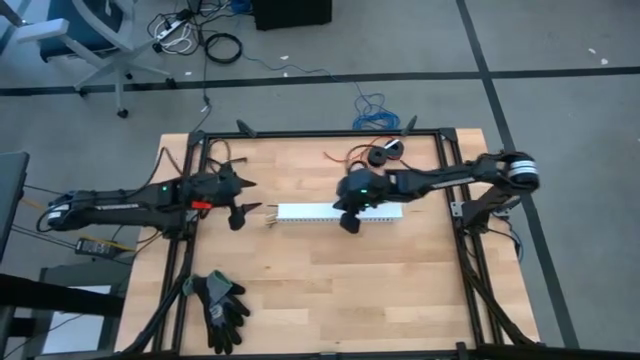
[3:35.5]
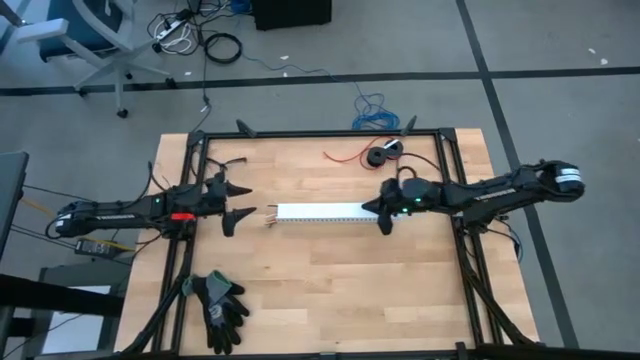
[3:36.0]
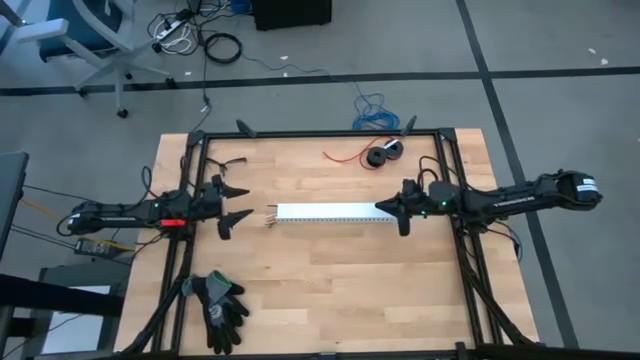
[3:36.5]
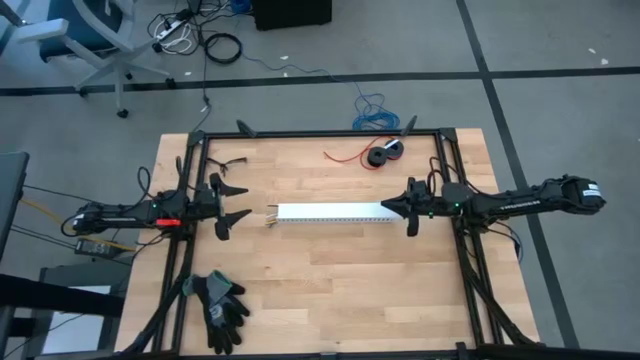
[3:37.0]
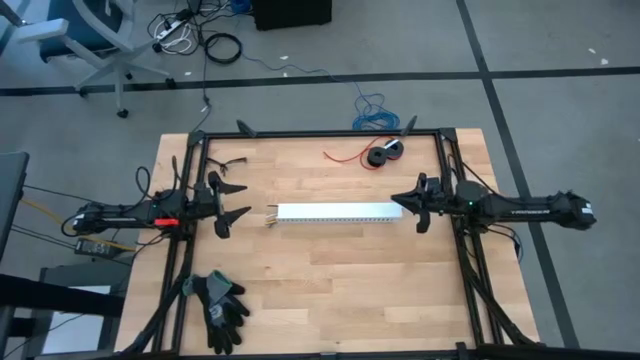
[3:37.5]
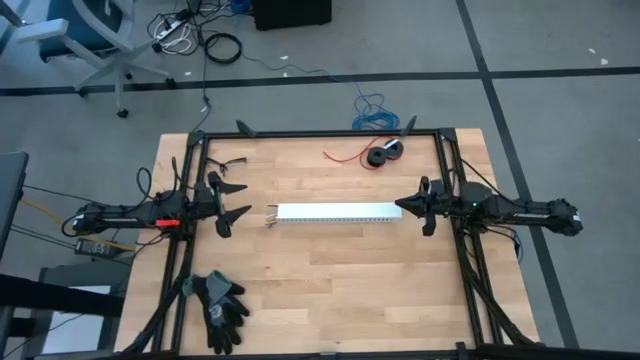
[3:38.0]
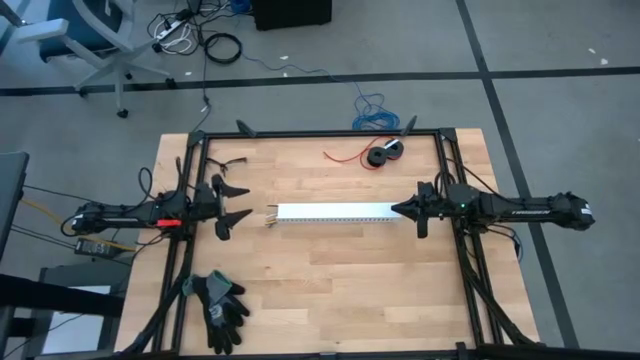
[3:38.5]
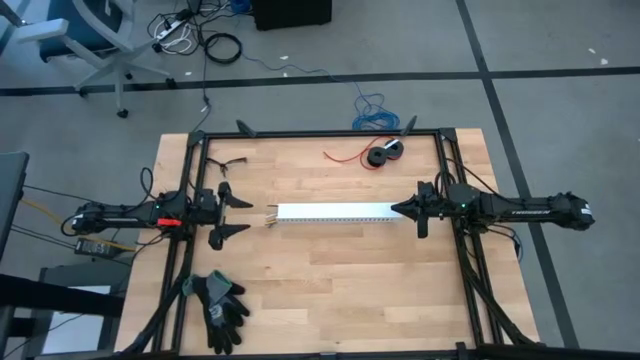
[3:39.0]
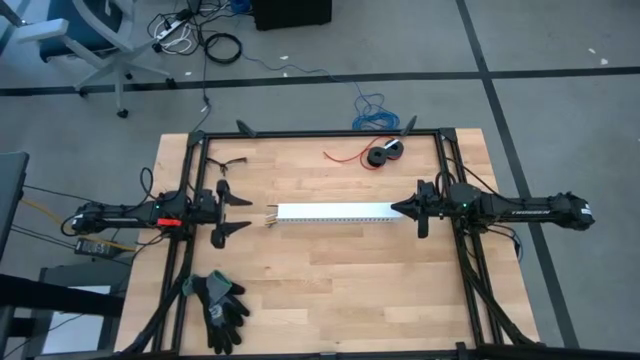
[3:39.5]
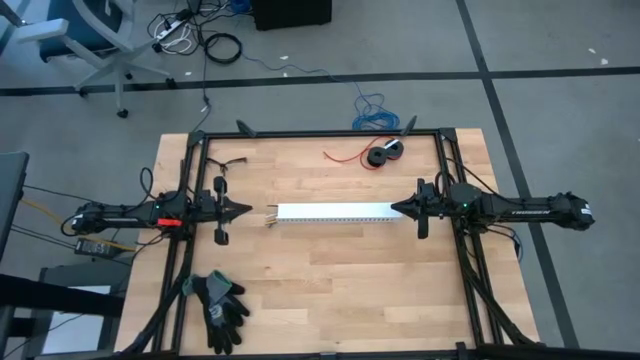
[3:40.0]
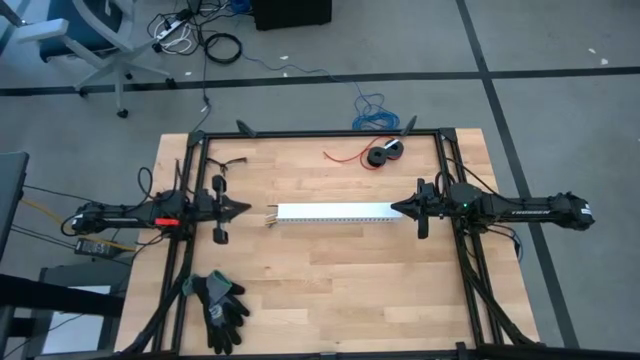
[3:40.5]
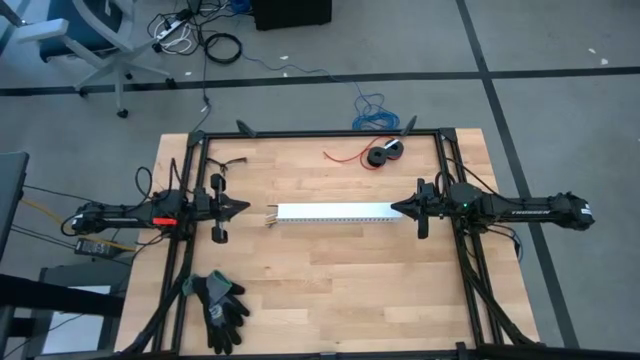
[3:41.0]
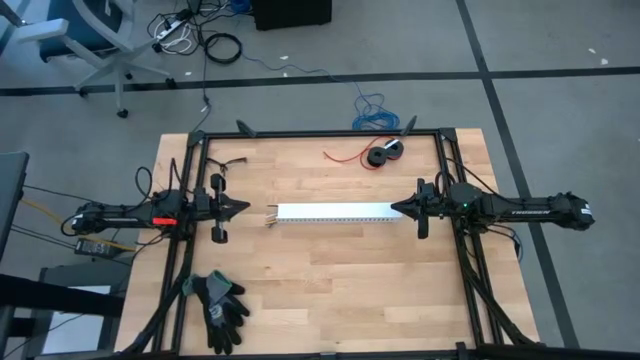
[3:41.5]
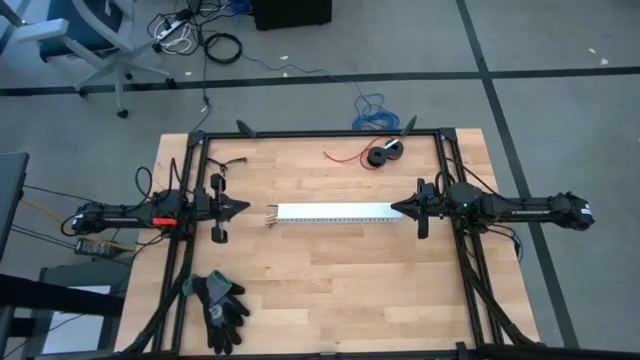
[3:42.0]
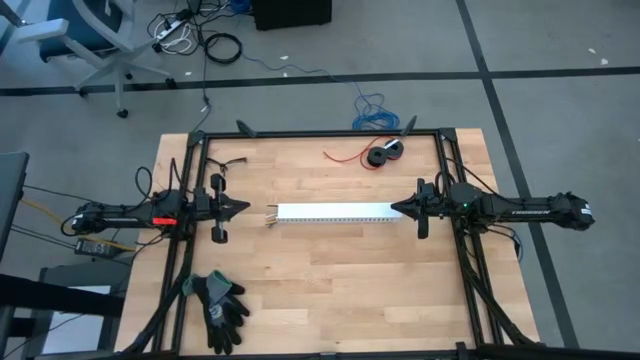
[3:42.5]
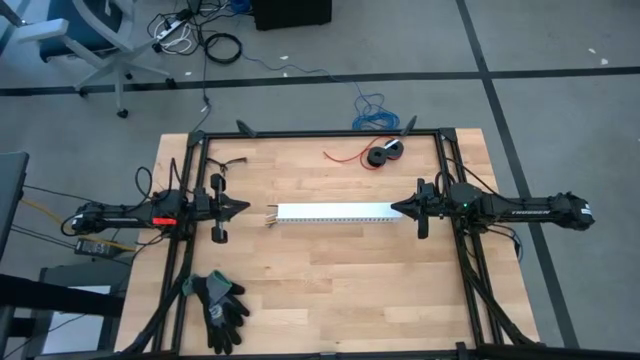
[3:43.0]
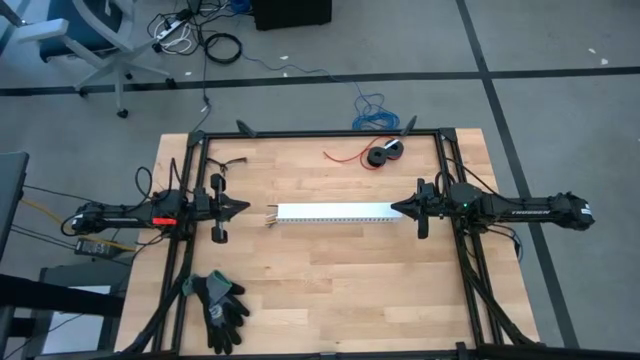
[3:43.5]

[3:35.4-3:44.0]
Task: Ziptie cables
Return to Home Position

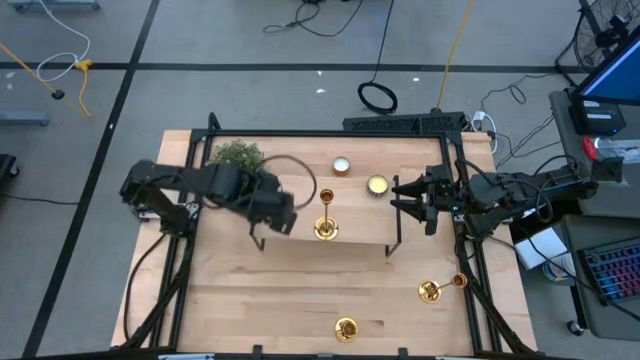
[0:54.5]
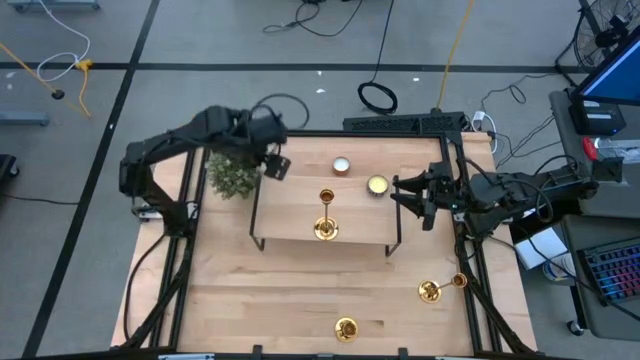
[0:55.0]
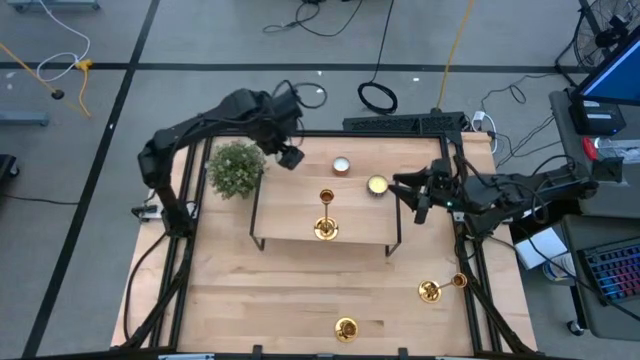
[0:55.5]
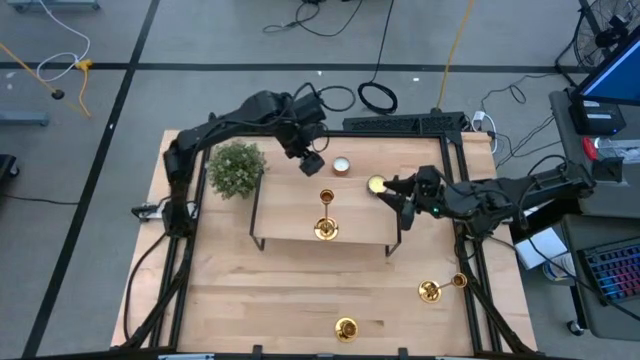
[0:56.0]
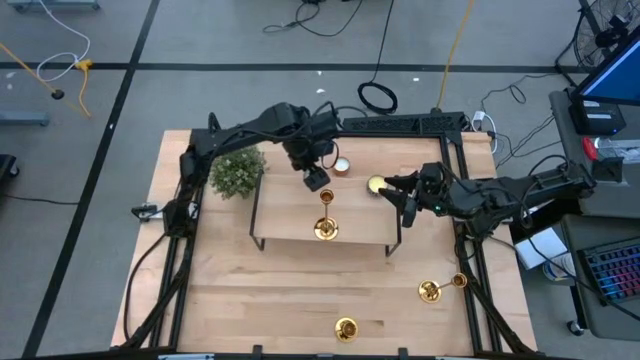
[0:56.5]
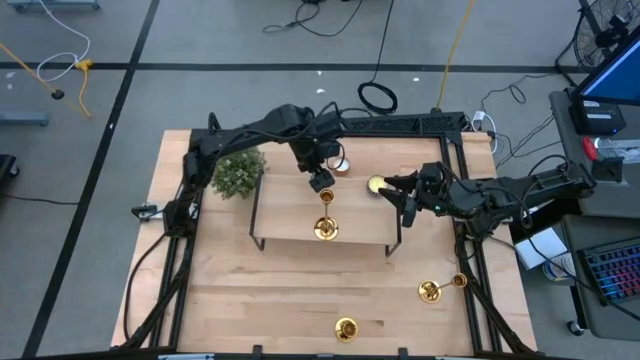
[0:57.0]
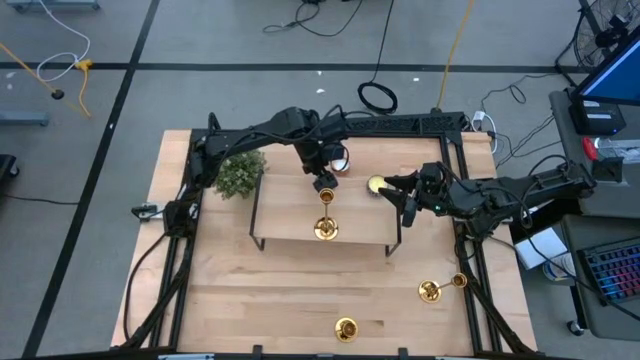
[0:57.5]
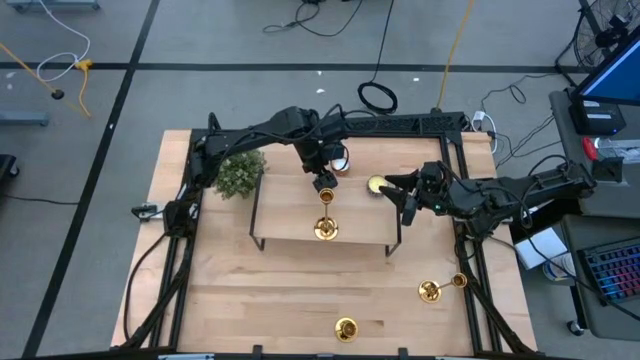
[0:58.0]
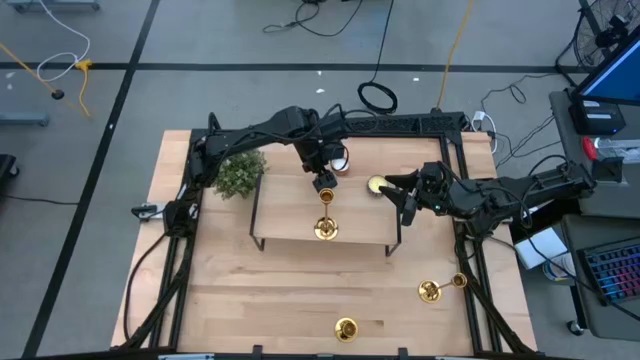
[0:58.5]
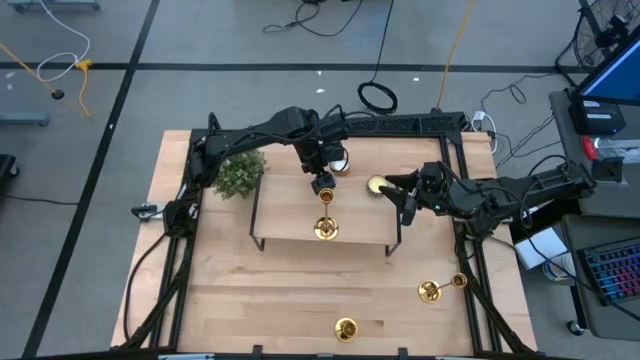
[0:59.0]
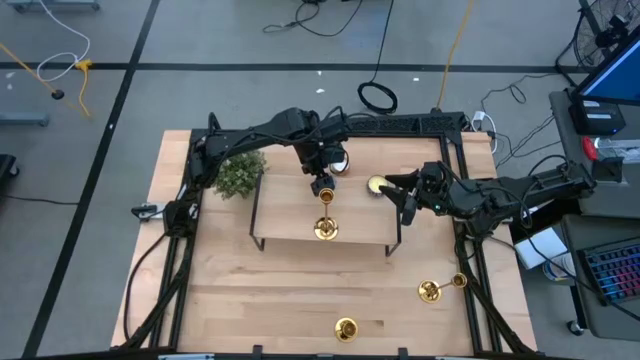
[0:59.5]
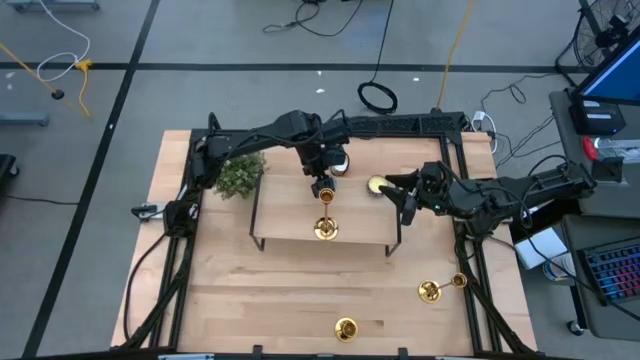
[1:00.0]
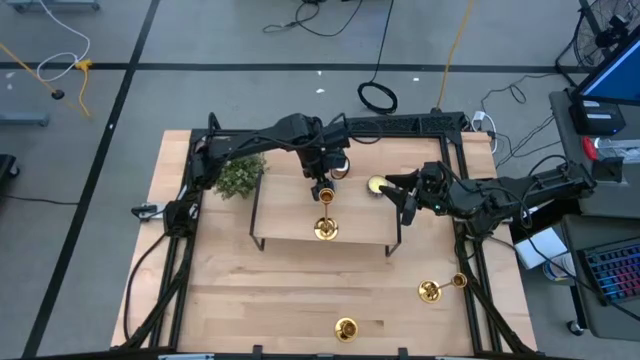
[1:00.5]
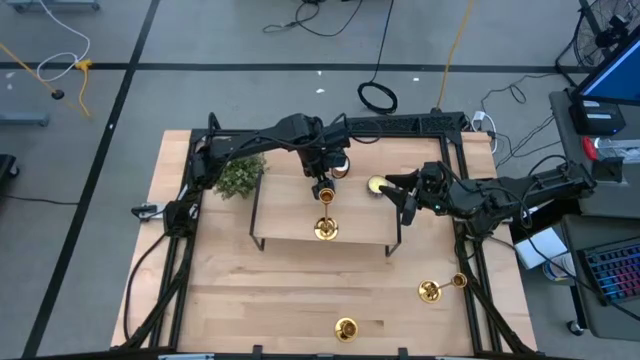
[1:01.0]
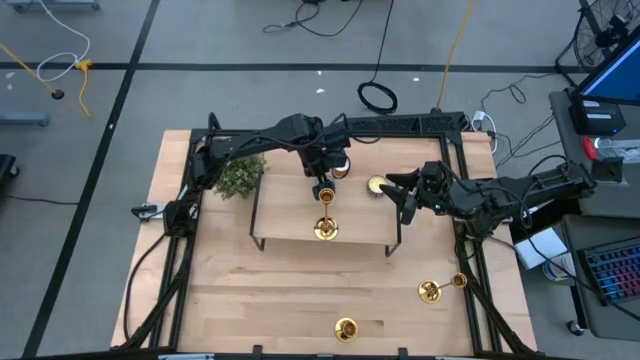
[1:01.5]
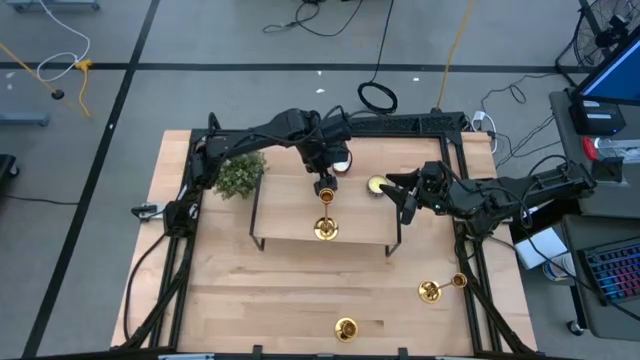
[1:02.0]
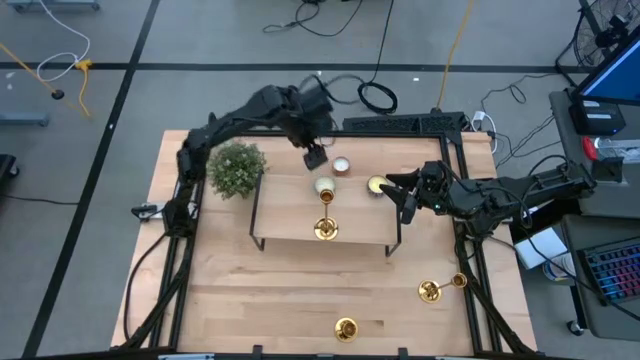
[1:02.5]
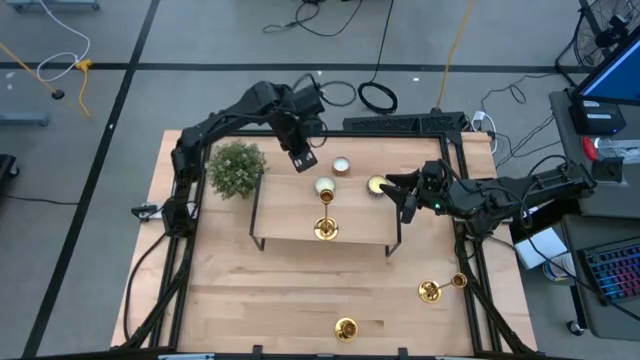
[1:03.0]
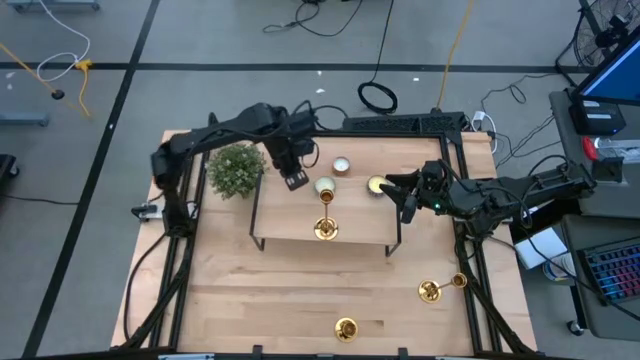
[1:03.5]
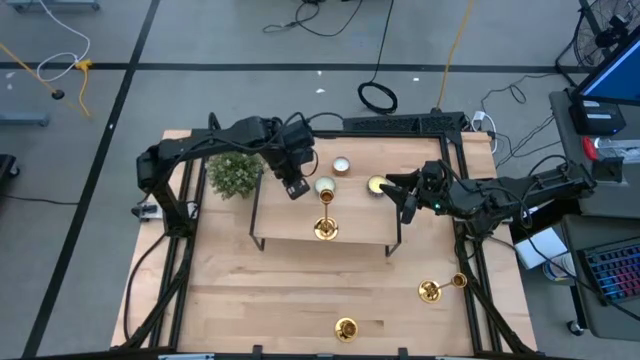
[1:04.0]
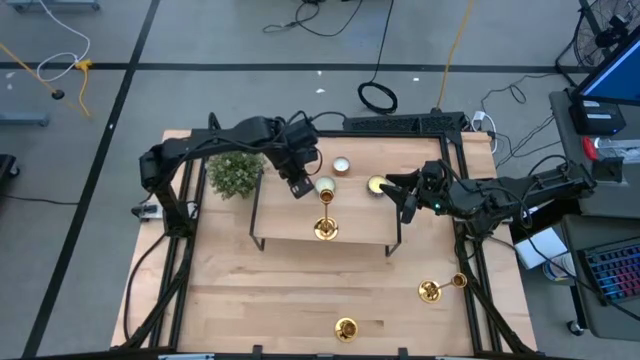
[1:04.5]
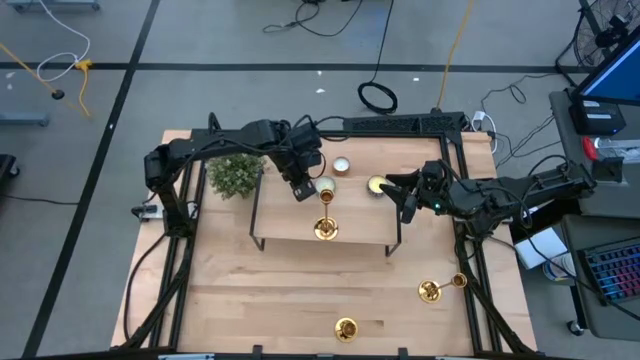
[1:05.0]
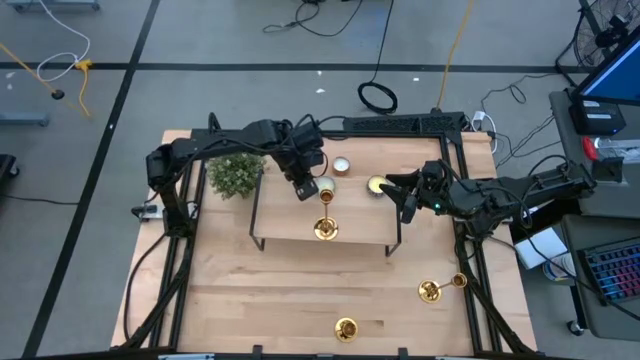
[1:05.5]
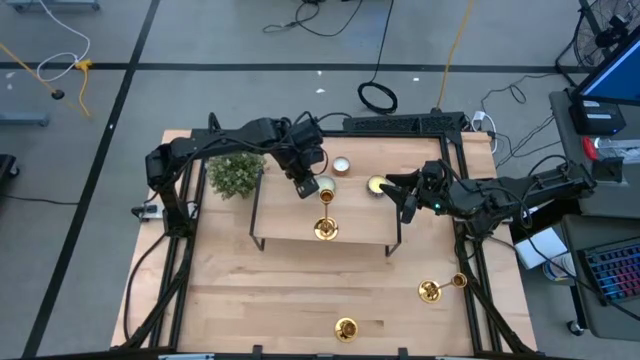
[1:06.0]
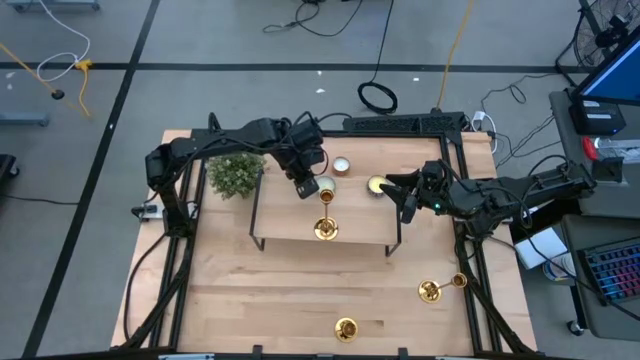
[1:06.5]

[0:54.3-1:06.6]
Task: Pick & Place candle stick holders
Put the bottom scented candle on the shelf
